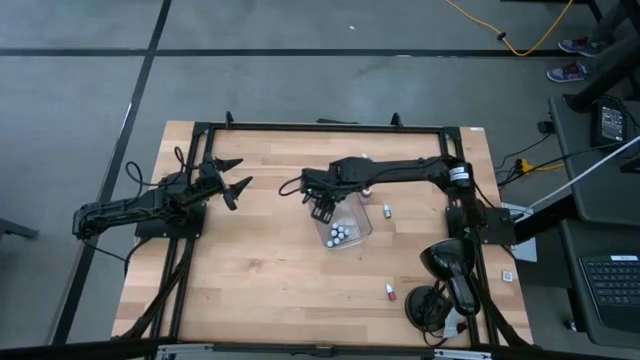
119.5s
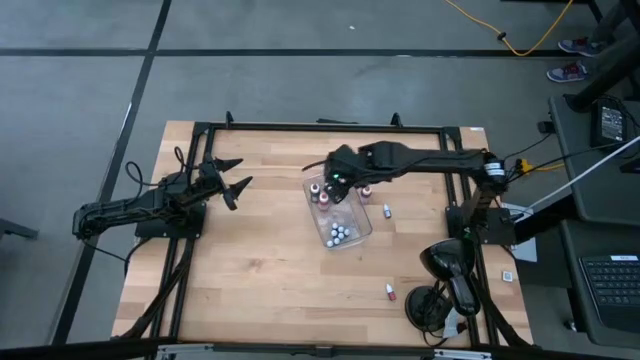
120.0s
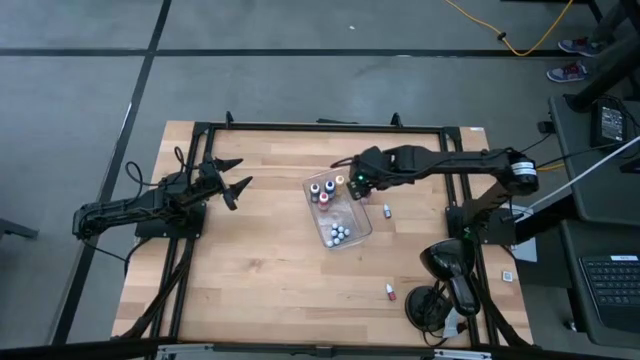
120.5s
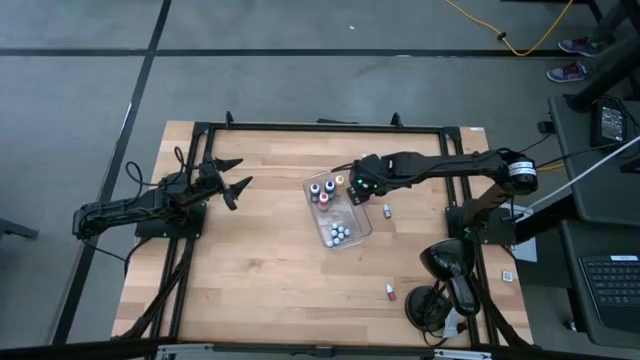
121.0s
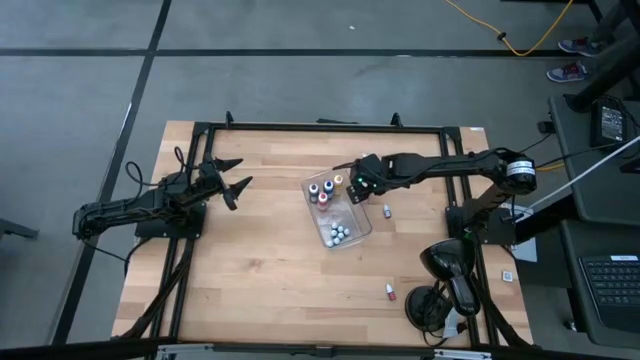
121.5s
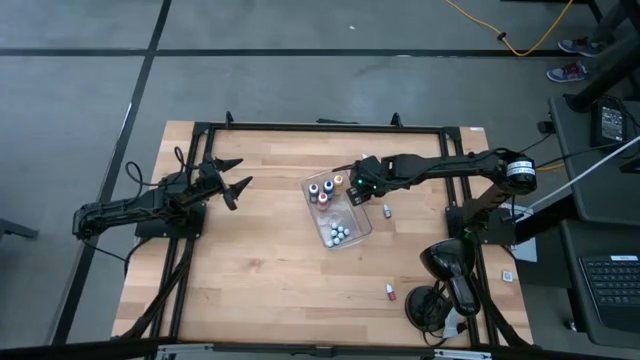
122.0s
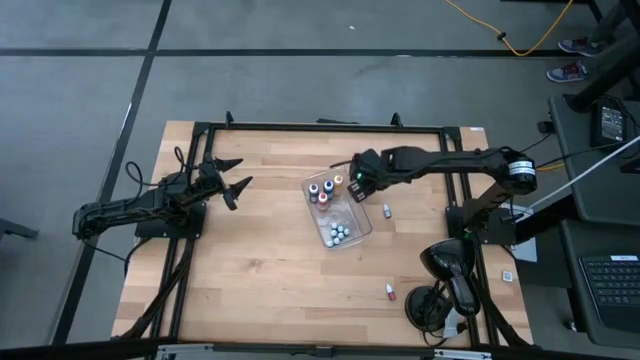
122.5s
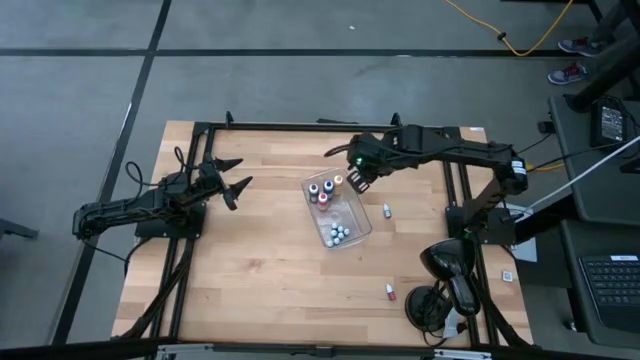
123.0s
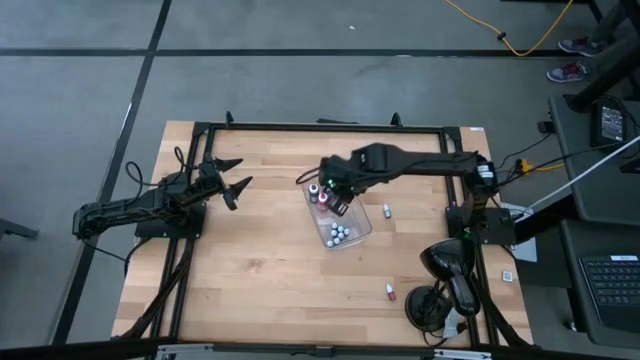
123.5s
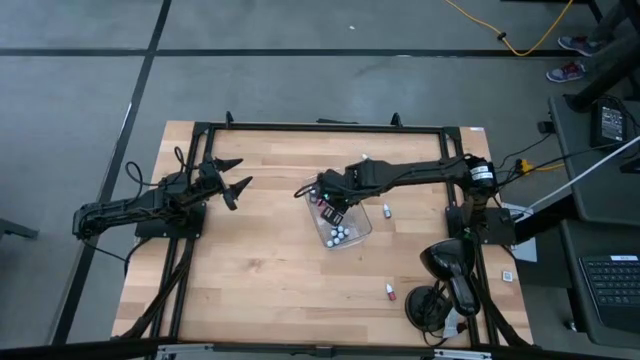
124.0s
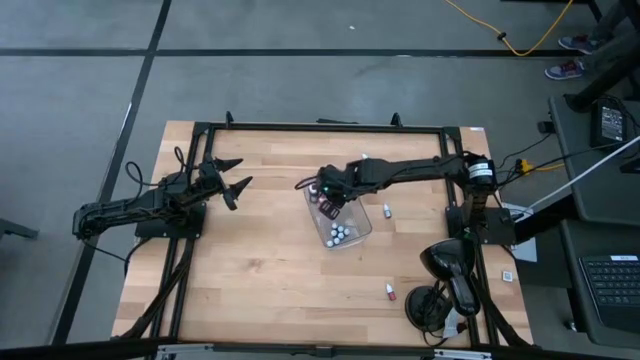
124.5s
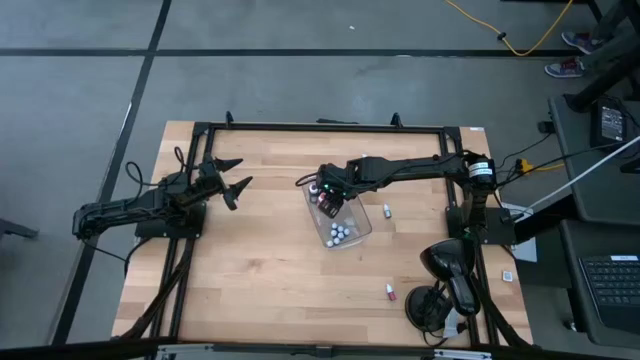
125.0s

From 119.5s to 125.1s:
Task: Pick & Place food coloring
Put the large pink food coloring bottle into the top of the bin

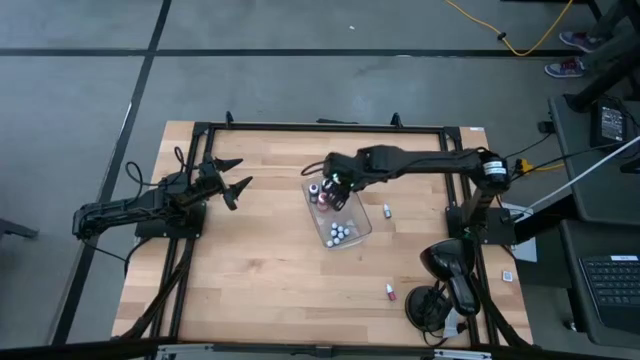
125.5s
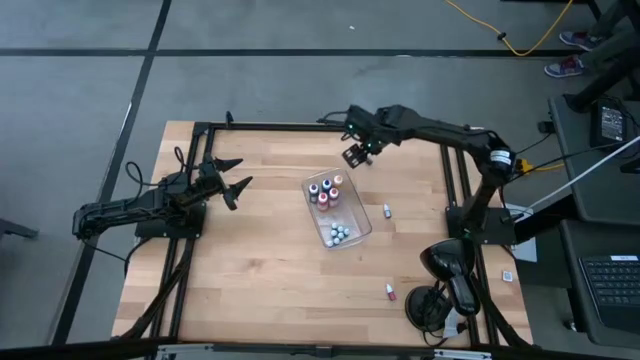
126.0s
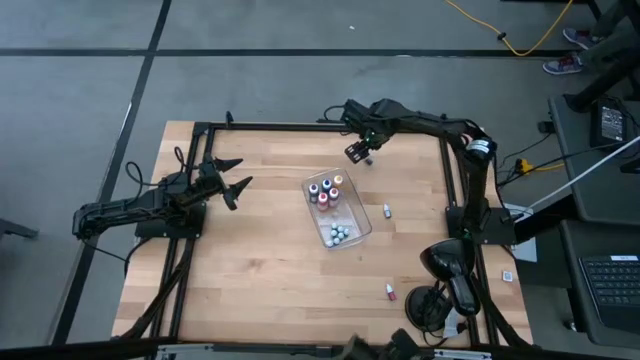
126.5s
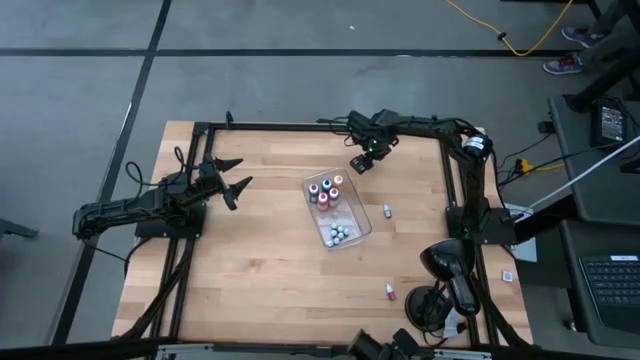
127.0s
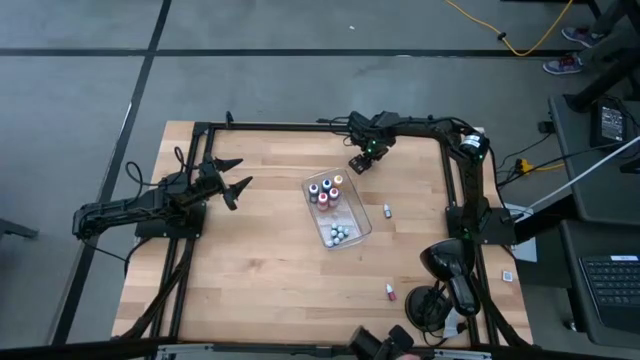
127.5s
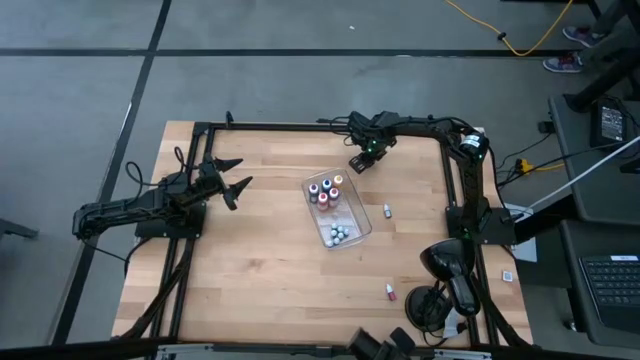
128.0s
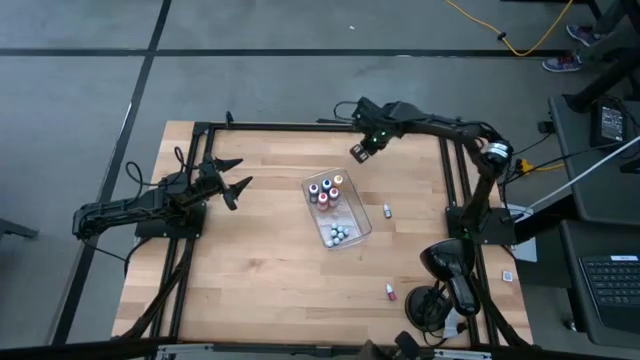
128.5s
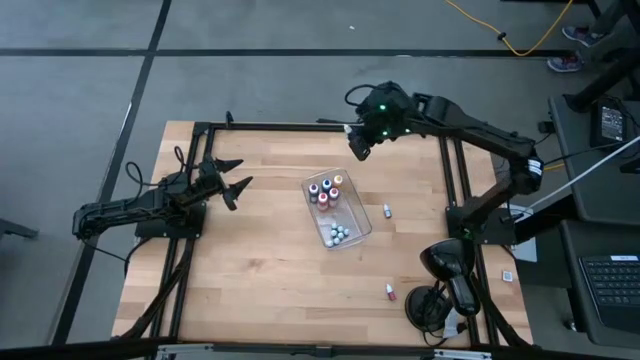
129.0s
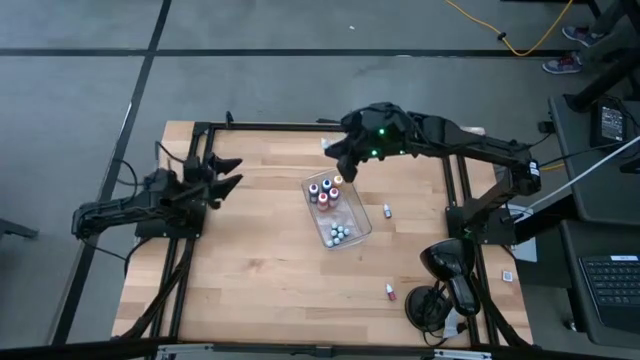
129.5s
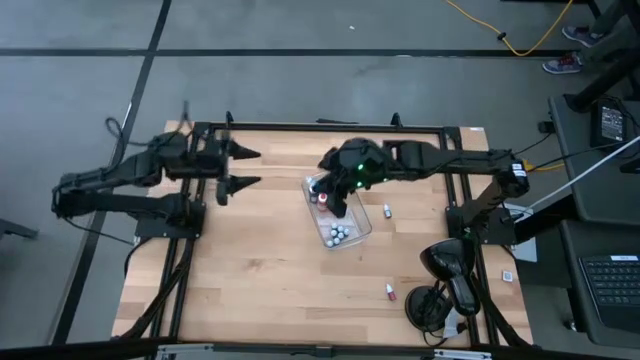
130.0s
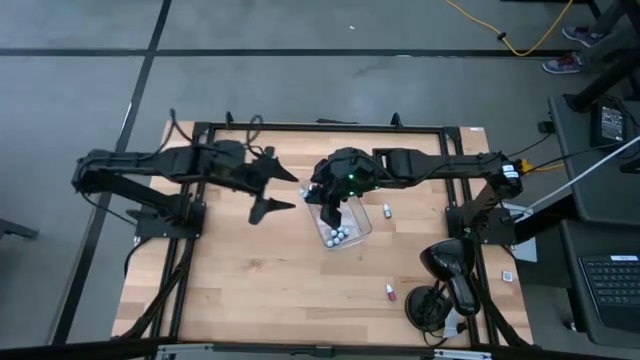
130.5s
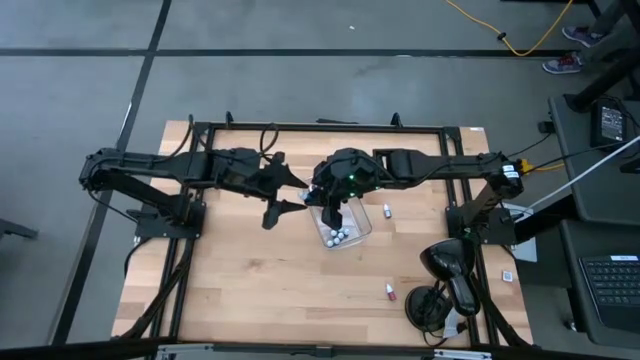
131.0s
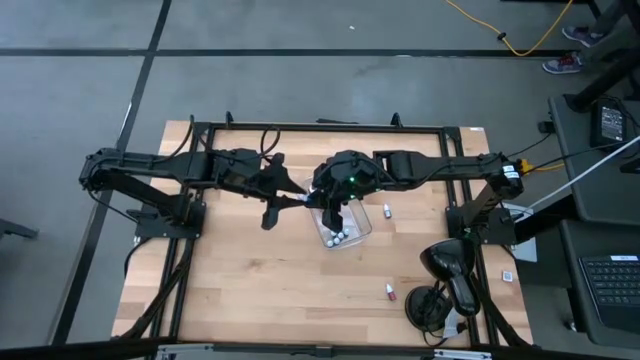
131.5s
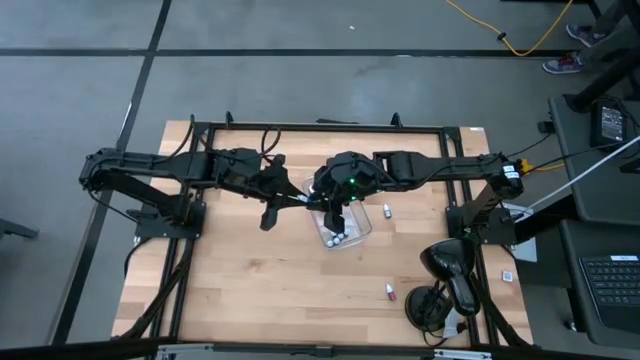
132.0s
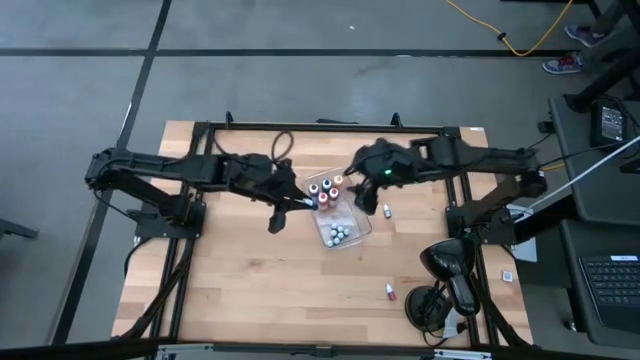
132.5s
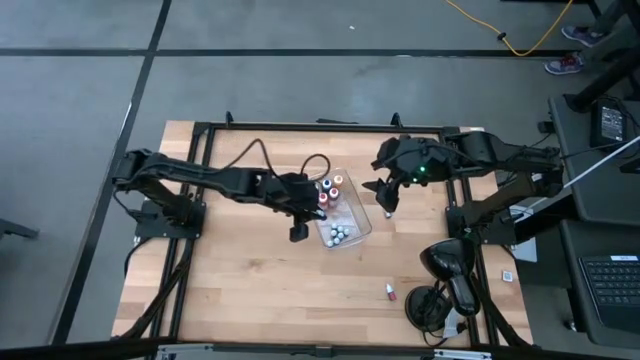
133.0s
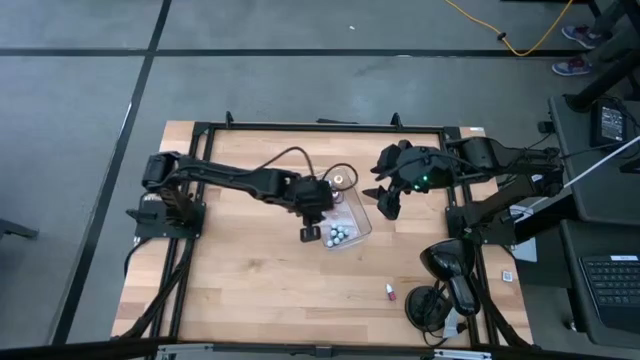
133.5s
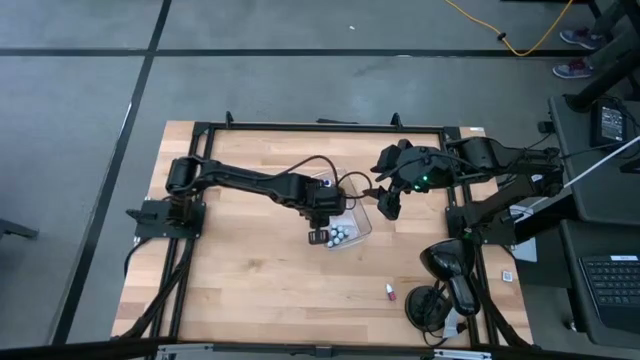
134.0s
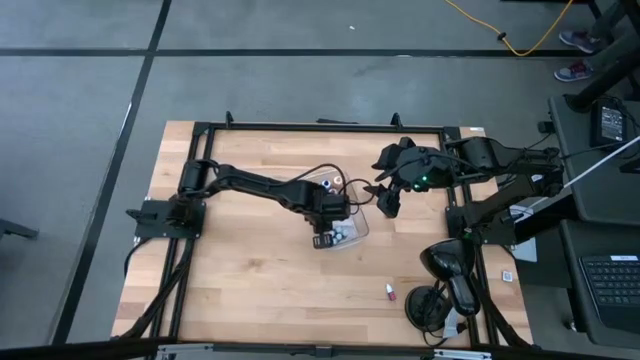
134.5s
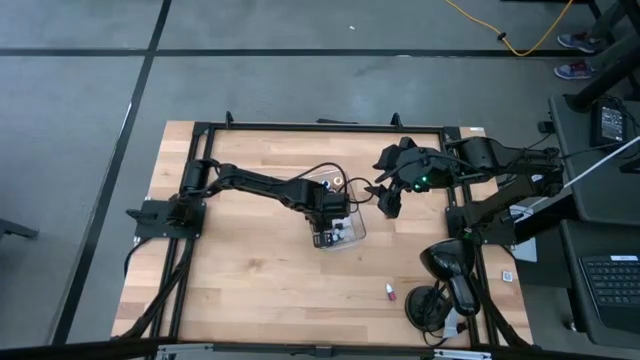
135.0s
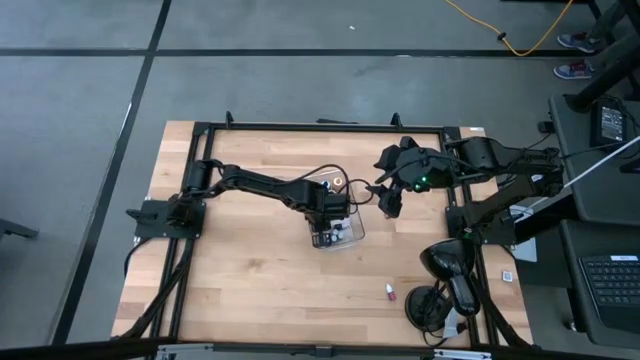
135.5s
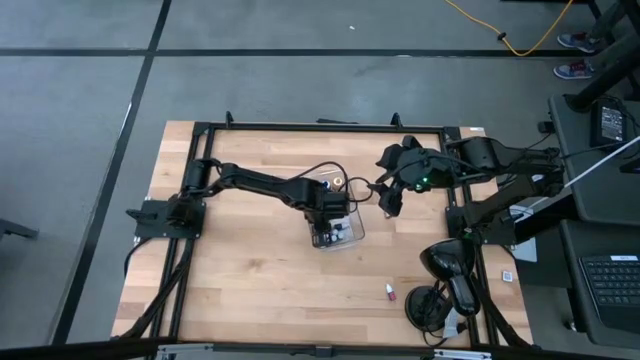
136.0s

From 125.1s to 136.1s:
Put the small blue food coloring bottle into the bottom of the bin

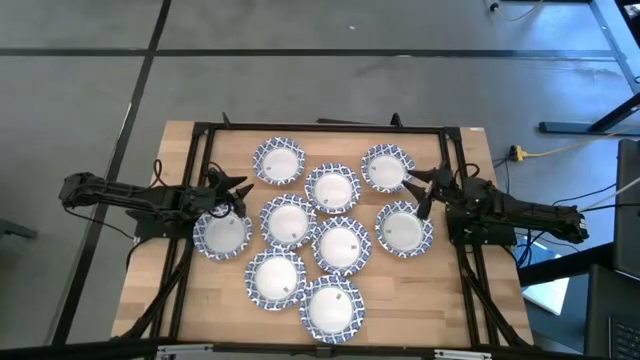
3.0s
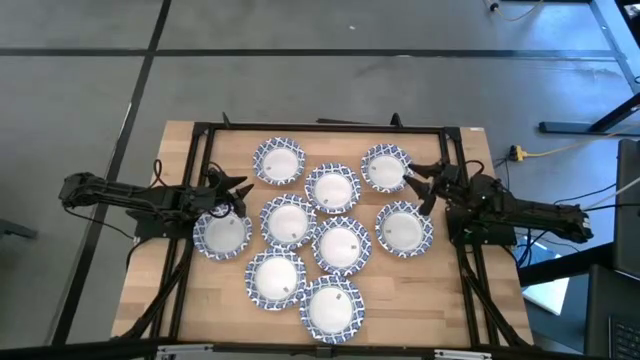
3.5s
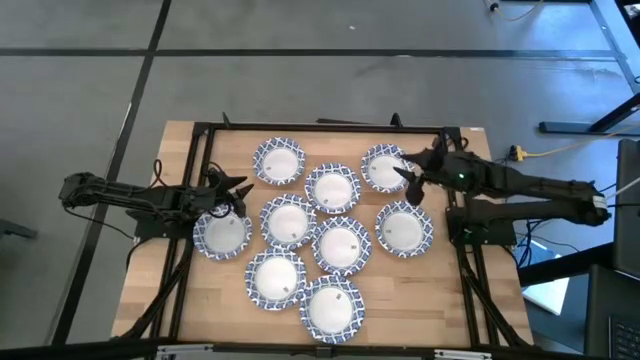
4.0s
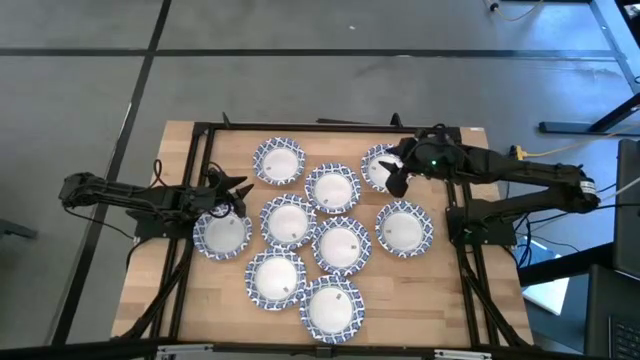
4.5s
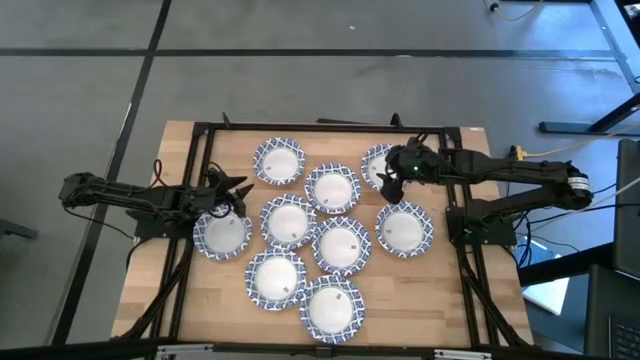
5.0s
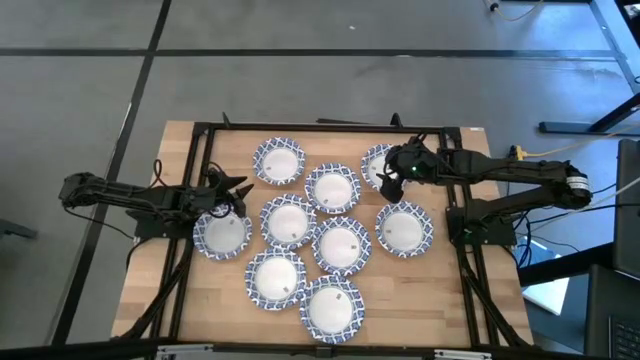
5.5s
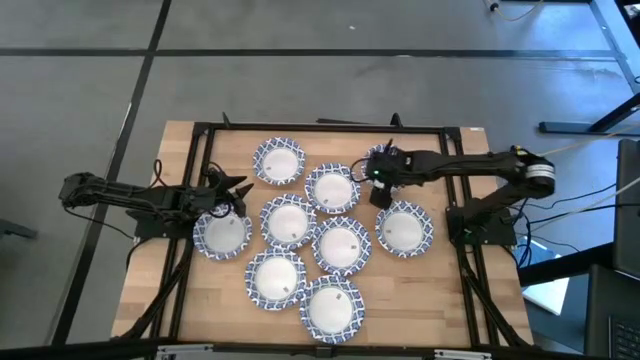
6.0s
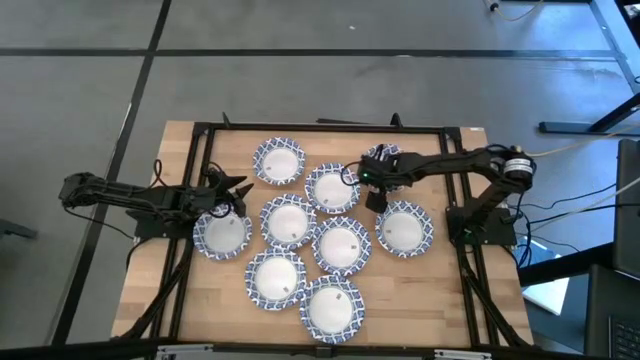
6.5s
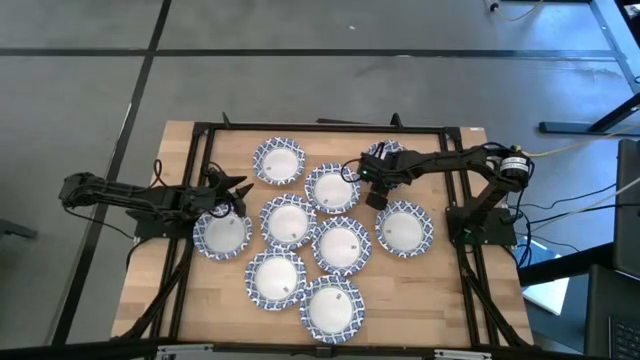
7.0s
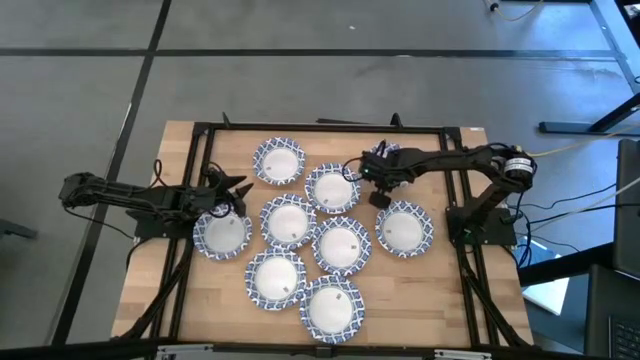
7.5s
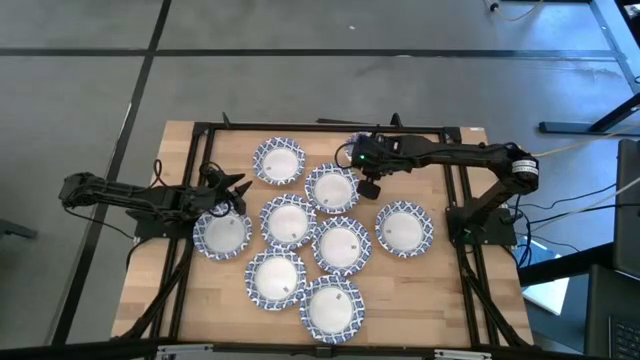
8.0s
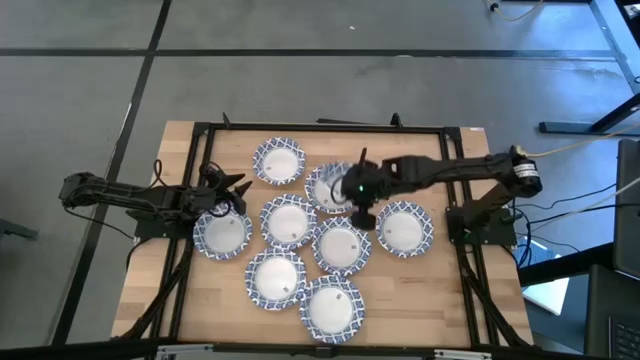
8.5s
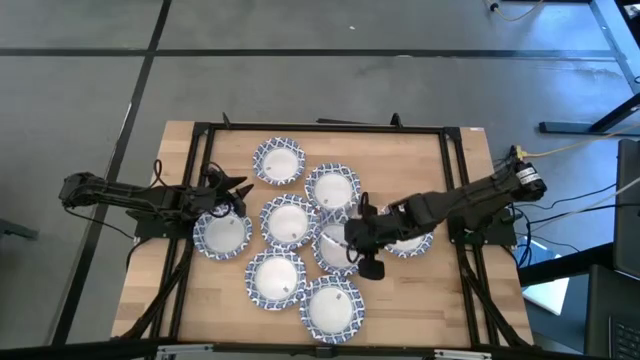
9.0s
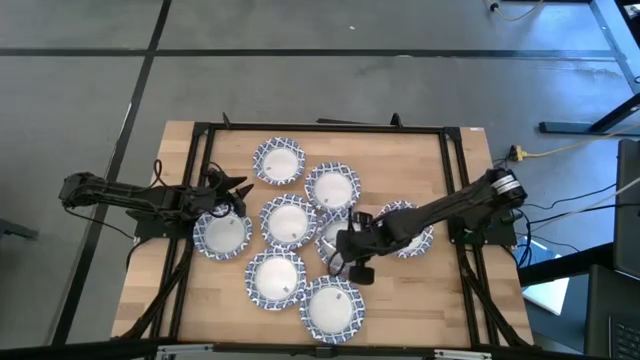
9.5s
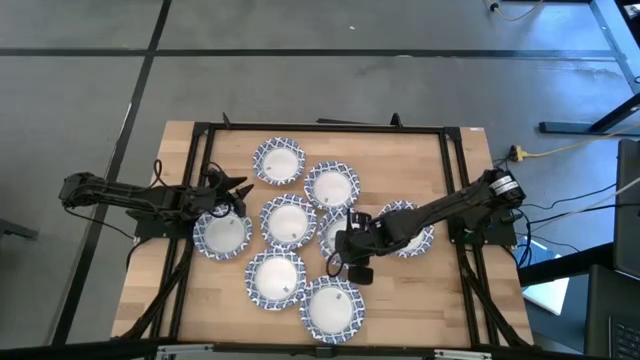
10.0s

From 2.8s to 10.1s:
Task: Nest bowls inside each other
Stack the white patterned bowls on top of the other white patterned bowls
